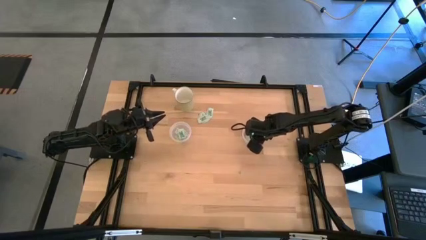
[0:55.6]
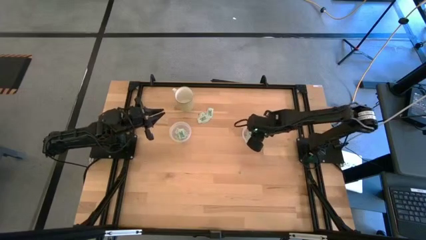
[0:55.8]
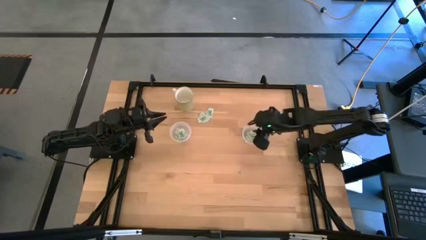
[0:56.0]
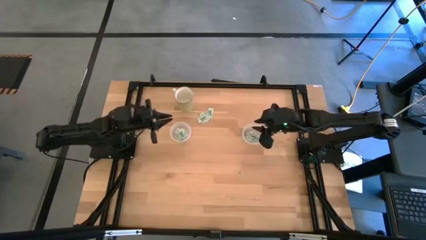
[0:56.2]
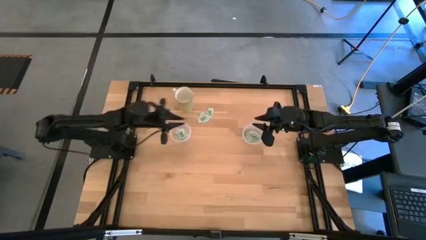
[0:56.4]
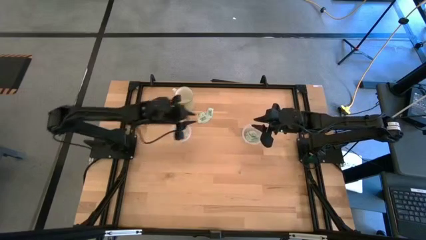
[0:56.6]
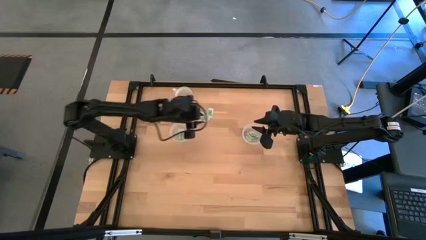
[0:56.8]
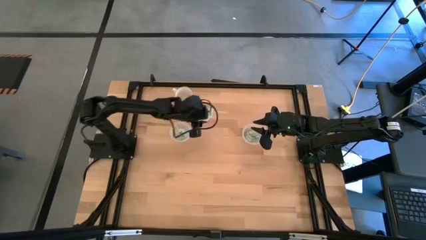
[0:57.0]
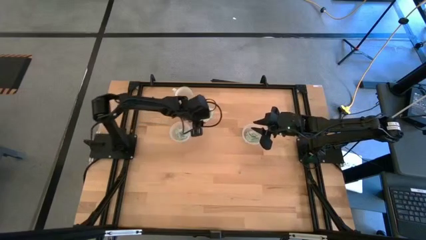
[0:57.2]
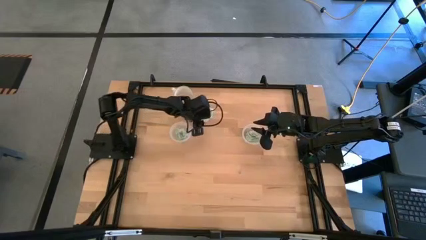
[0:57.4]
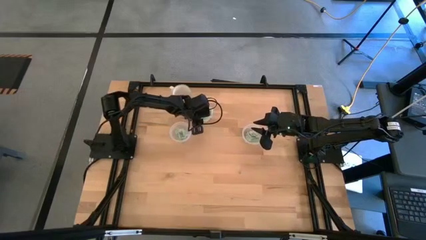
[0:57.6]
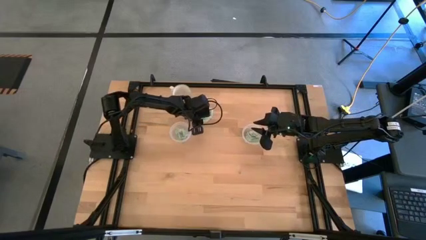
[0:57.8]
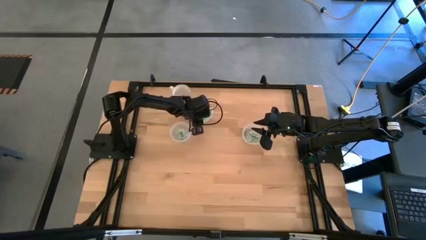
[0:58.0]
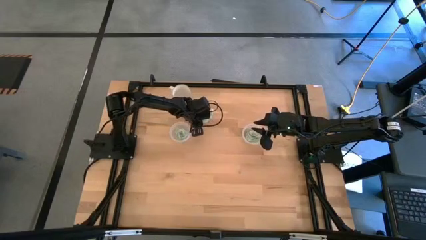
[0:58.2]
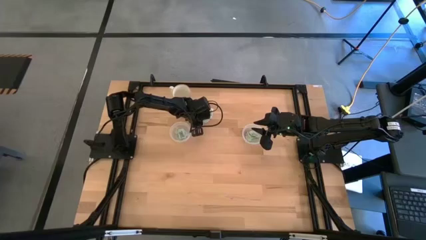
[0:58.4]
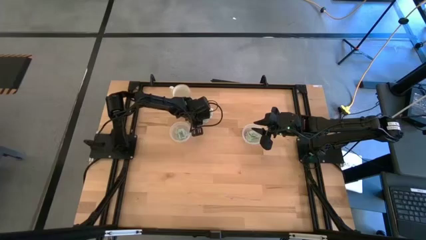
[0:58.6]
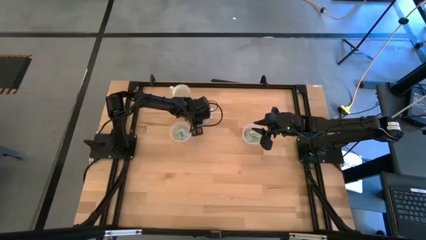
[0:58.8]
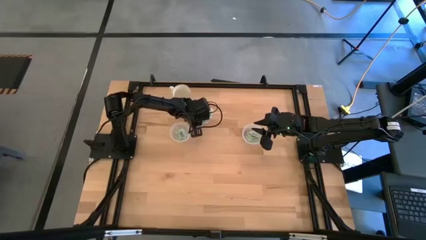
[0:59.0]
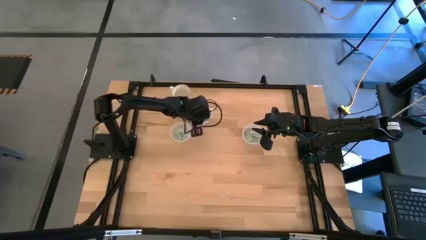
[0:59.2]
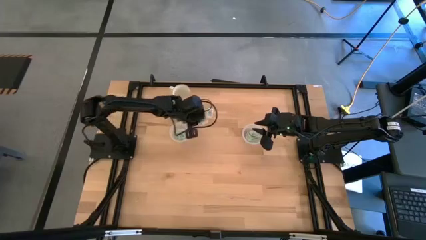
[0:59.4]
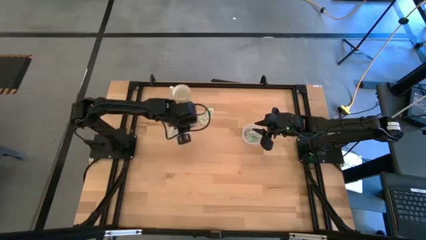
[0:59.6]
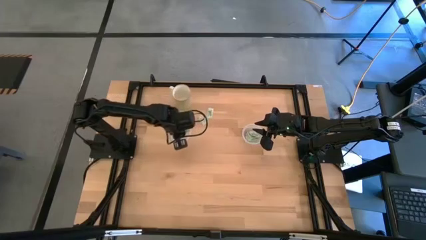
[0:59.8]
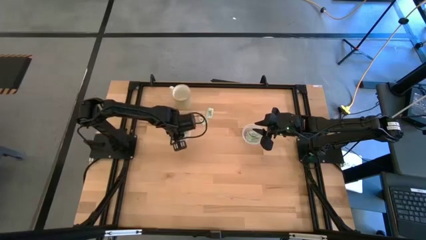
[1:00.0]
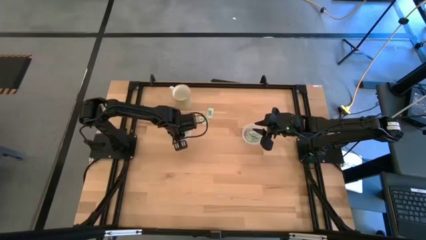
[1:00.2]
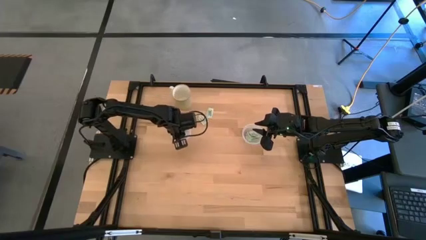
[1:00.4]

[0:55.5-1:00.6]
Task: Pick and place Stevia / Truvia into bins
Put the stevia packet into the left transparent container

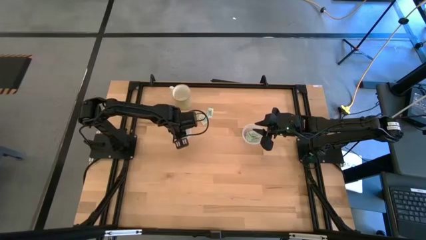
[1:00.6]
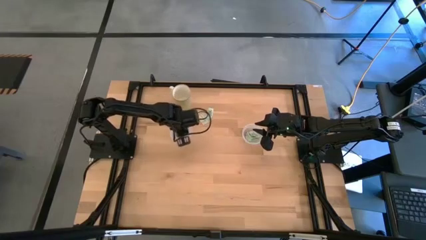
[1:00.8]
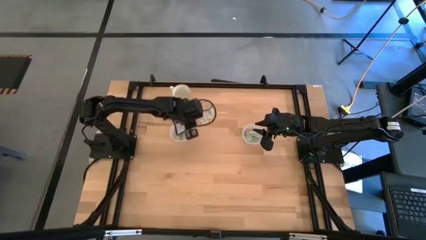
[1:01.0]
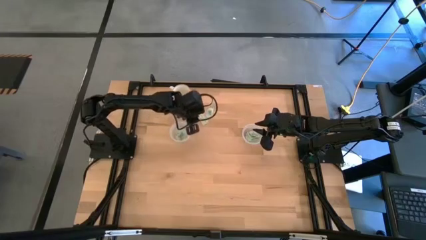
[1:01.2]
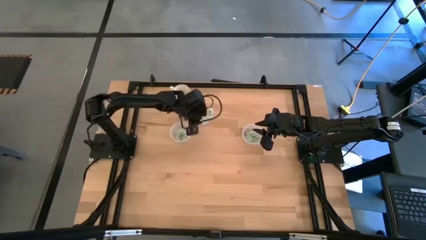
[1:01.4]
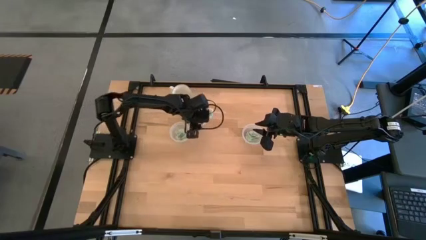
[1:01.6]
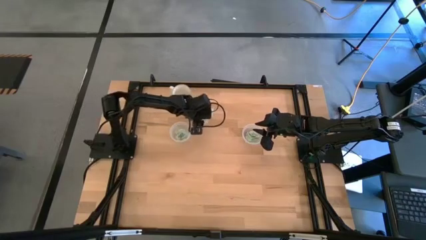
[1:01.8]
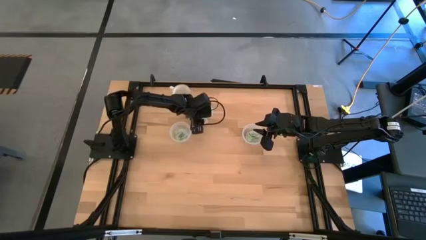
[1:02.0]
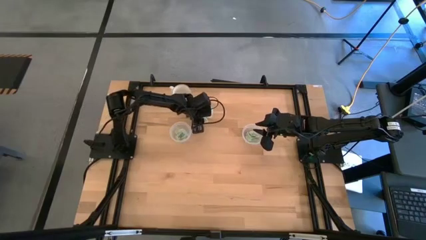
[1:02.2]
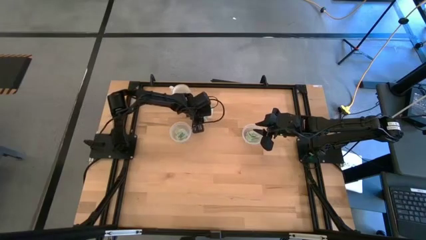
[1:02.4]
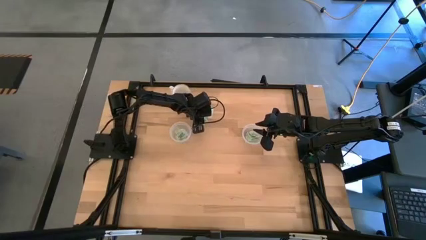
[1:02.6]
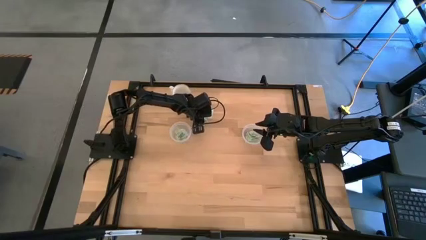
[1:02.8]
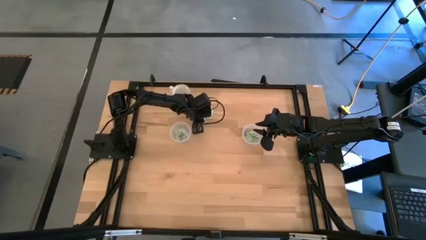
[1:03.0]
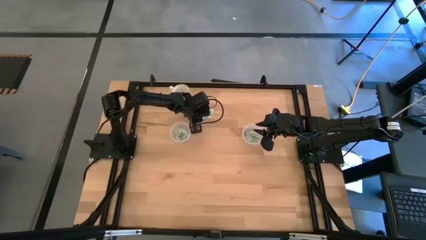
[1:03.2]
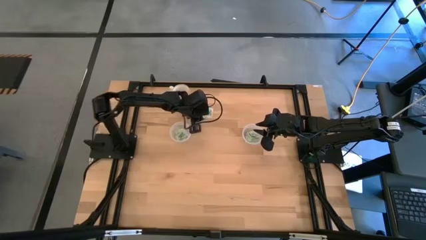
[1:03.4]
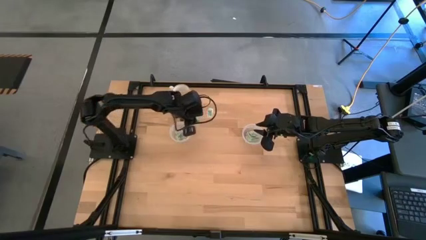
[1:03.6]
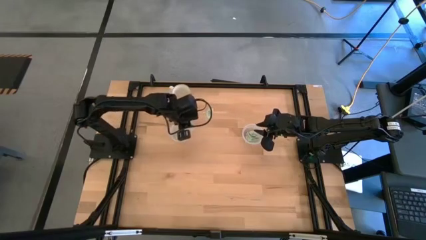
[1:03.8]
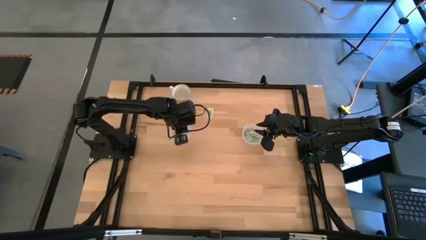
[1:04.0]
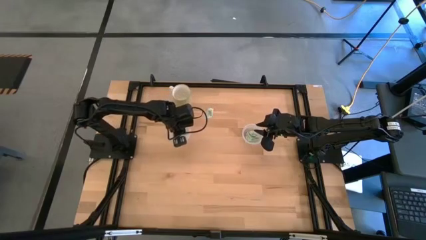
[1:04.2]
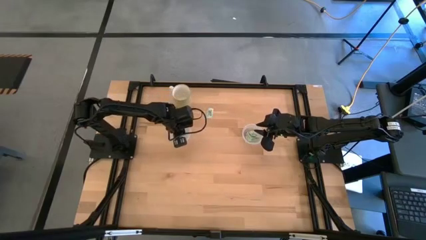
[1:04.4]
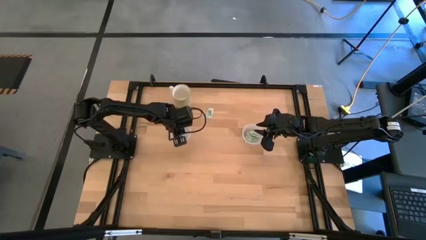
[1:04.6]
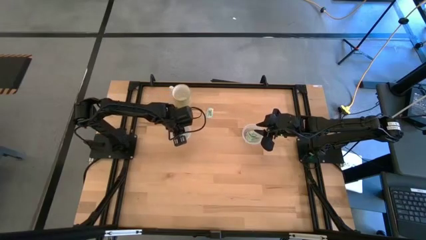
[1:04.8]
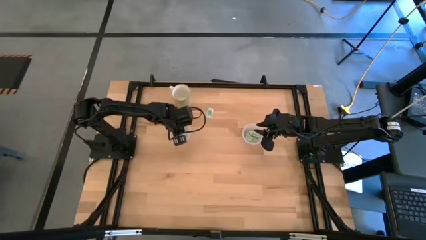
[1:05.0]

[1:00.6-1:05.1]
Put the stevia packet into the left transparent container

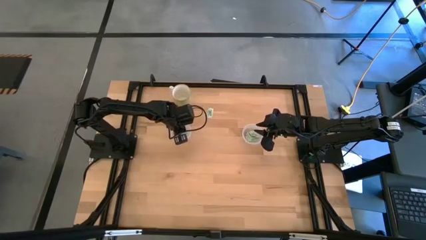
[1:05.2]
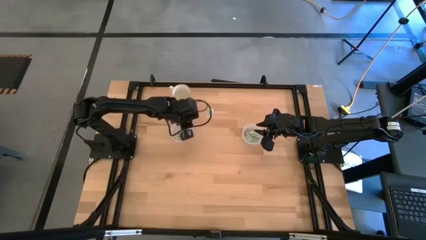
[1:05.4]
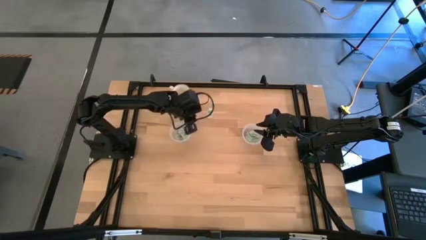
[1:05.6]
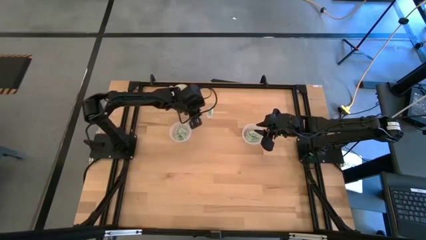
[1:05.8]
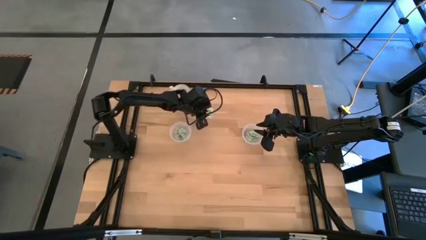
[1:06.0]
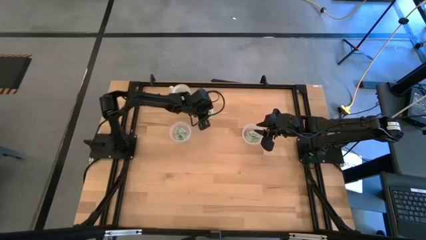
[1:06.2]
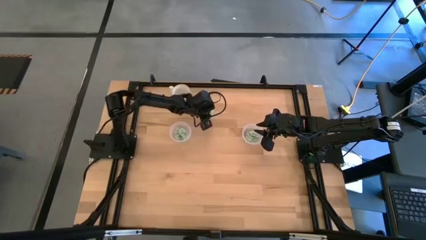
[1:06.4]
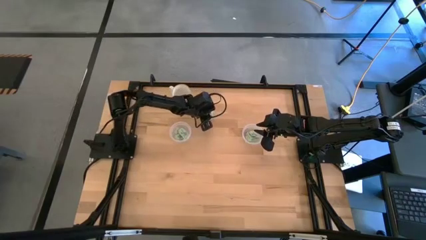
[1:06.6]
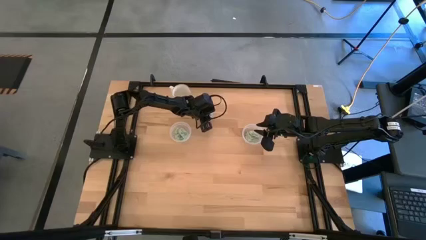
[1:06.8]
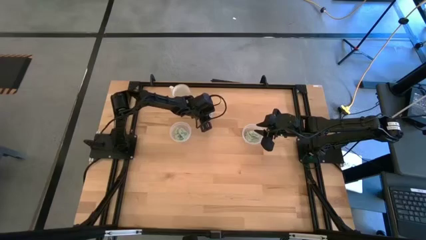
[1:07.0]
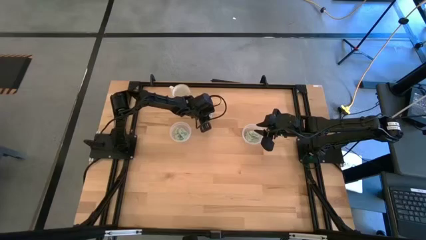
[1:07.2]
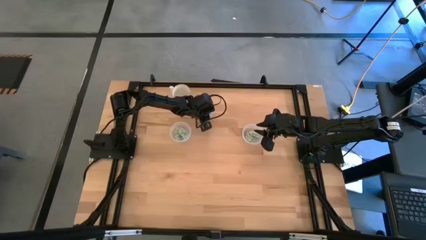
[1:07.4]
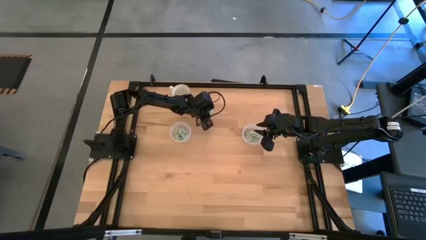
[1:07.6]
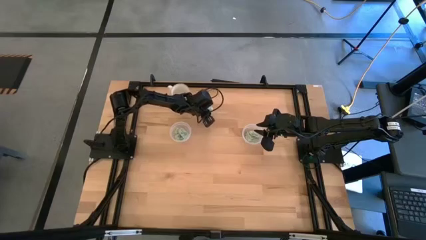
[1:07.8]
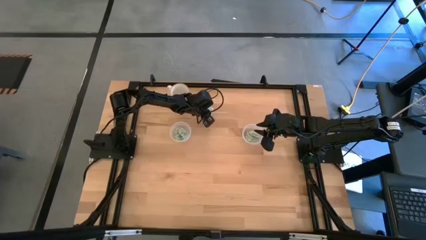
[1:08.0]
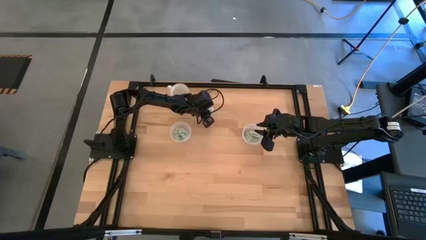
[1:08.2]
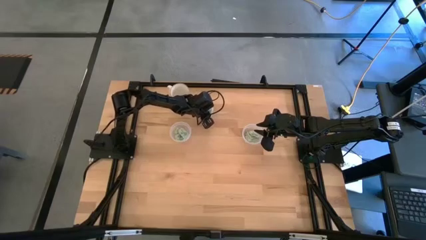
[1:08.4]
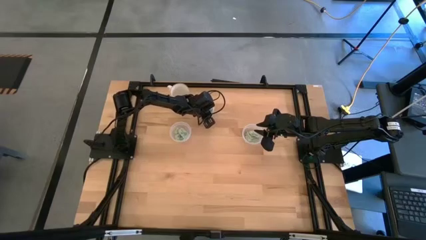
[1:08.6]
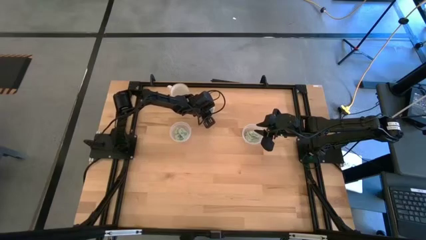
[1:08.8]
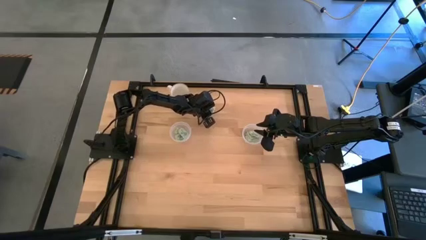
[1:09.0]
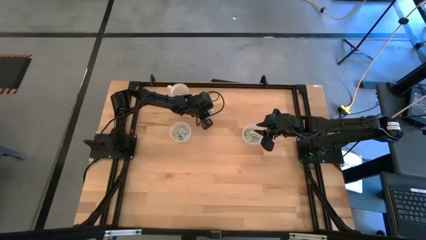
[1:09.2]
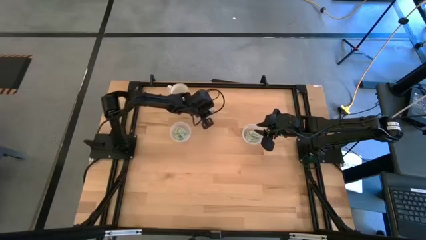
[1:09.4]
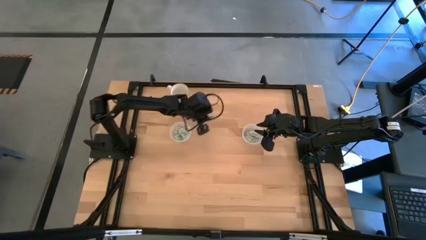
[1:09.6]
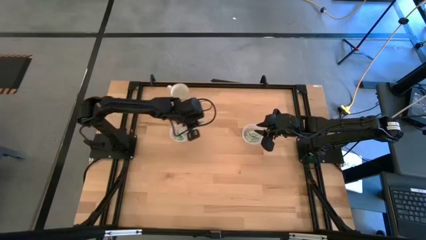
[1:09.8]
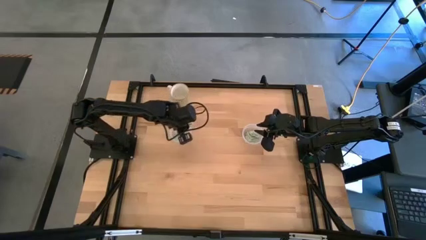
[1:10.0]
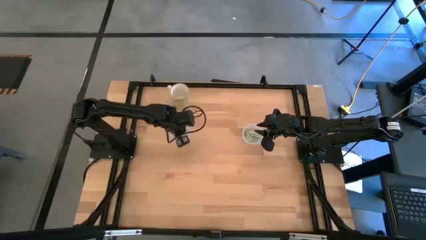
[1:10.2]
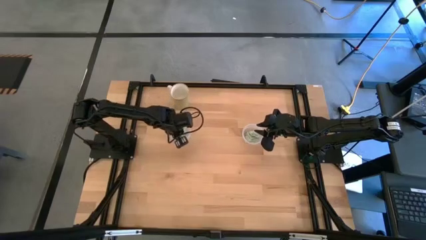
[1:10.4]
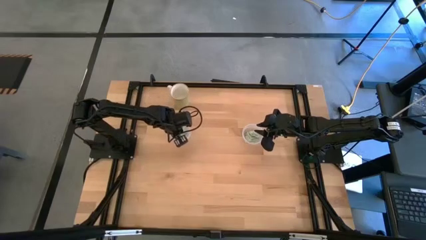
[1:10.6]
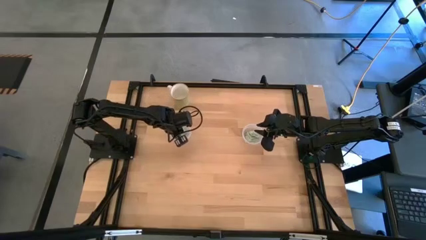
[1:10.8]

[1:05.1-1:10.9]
Put the stevia packet into the left transparent container

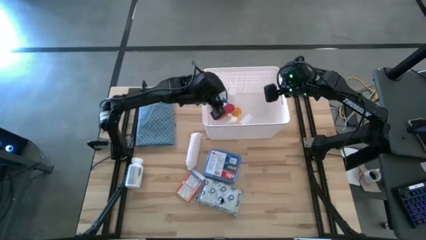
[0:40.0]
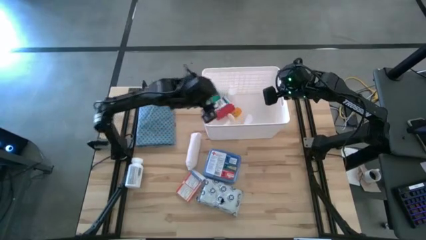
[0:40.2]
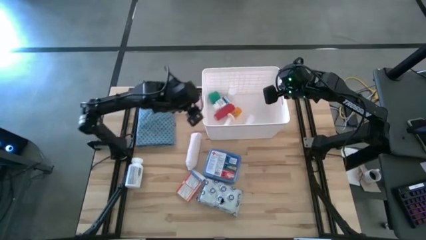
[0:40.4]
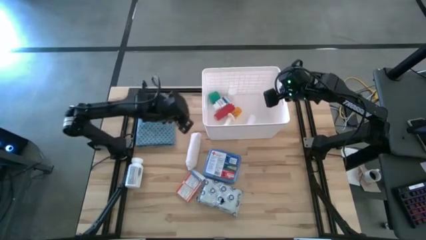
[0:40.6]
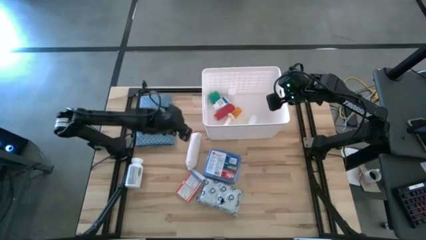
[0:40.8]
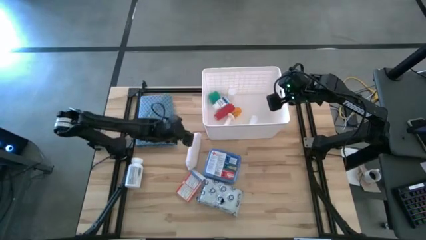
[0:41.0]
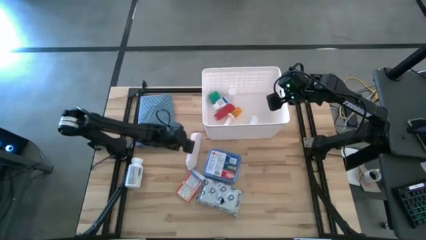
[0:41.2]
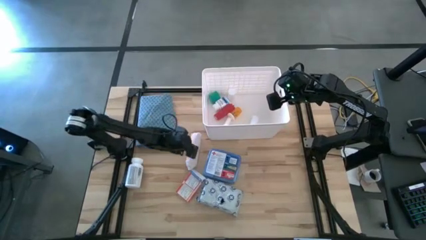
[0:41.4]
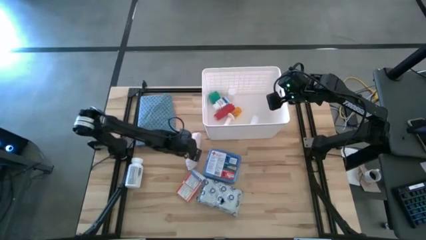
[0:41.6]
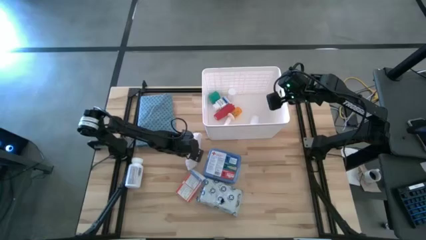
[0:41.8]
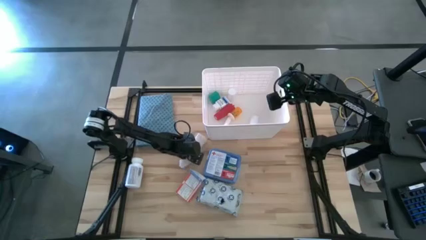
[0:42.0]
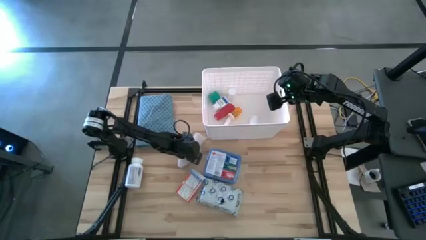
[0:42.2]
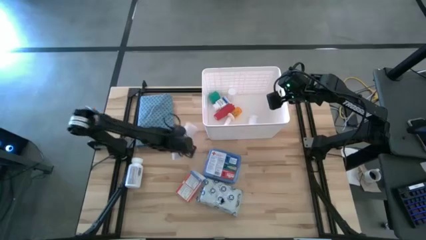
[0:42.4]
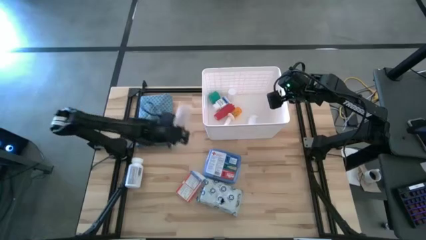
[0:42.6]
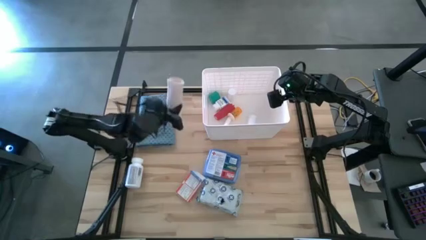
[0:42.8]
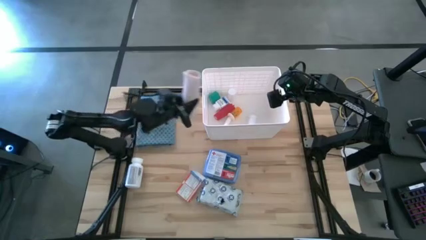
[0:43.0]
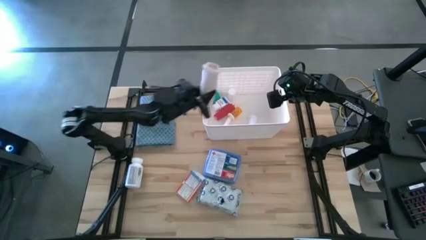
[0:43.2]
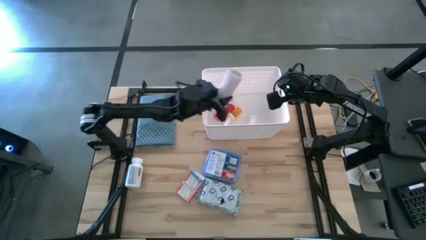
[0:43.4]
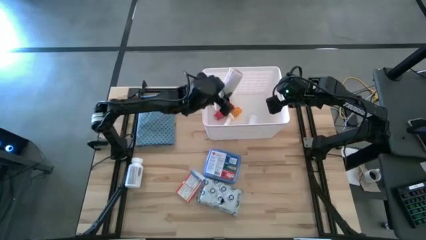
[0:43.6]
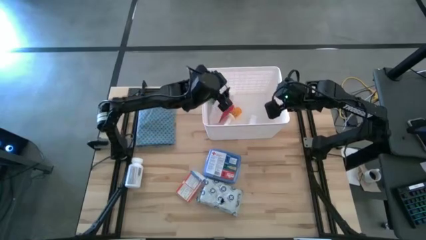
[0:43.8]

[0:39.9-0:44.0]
Task: Pick & place medical supplies in basket/bin
Put the white rolled bandage into the white bin
